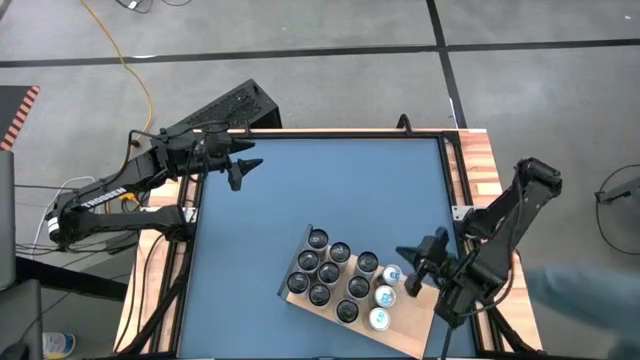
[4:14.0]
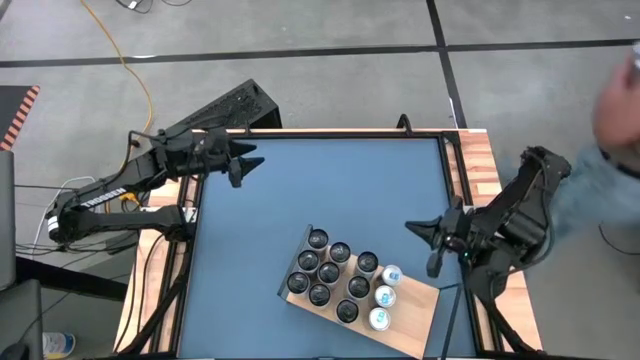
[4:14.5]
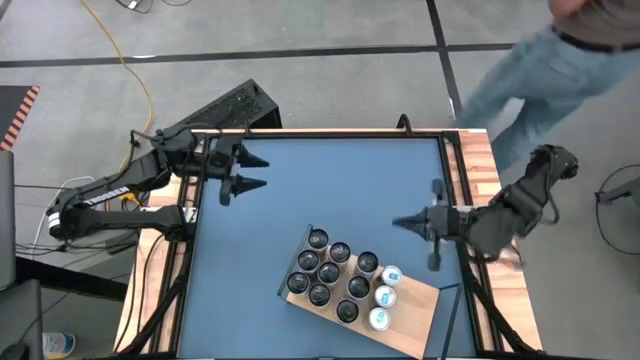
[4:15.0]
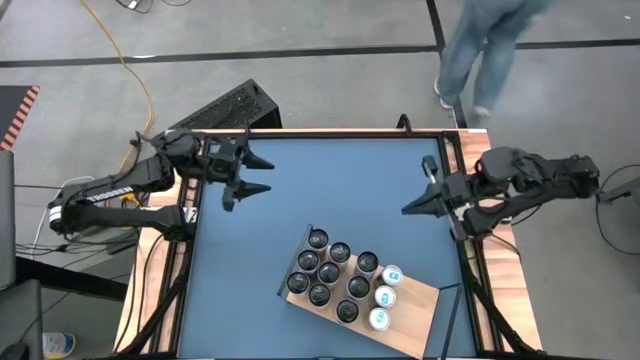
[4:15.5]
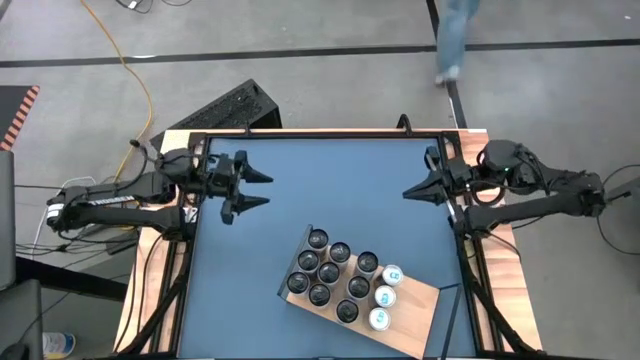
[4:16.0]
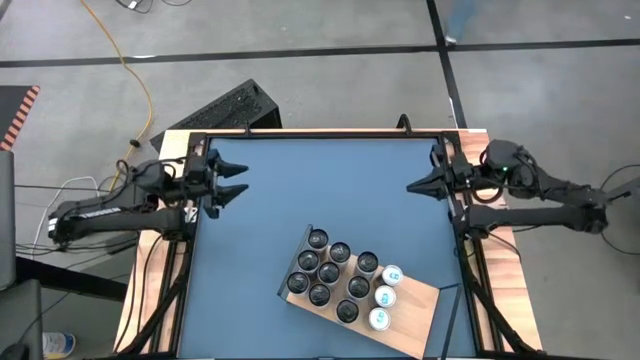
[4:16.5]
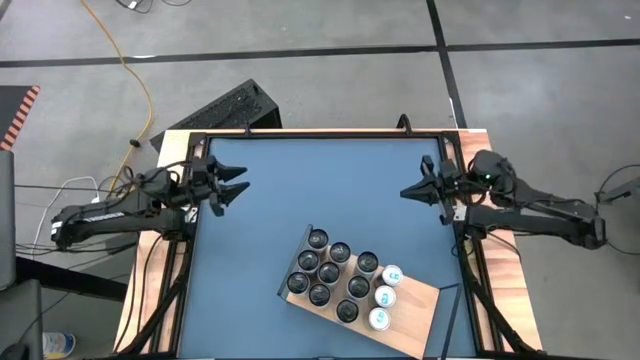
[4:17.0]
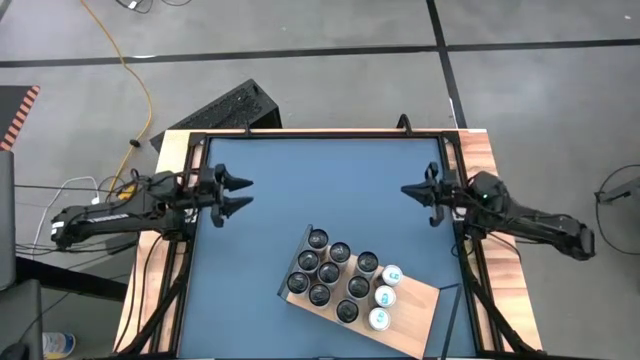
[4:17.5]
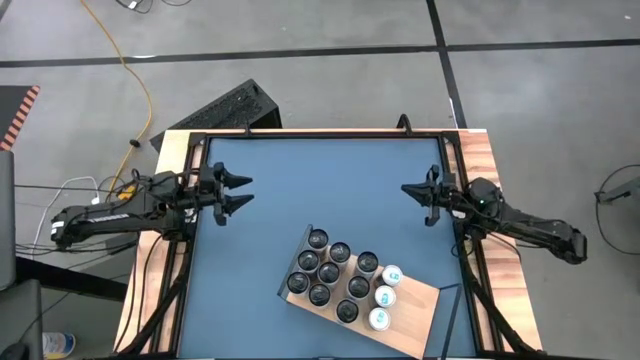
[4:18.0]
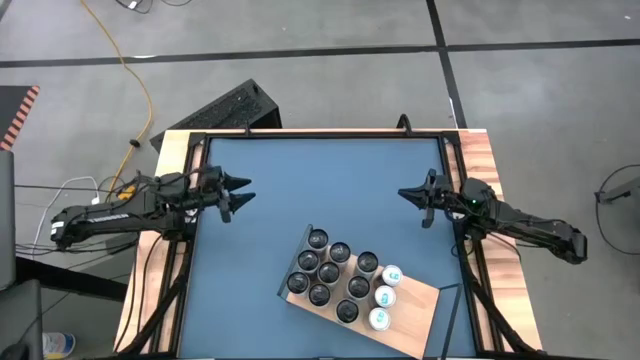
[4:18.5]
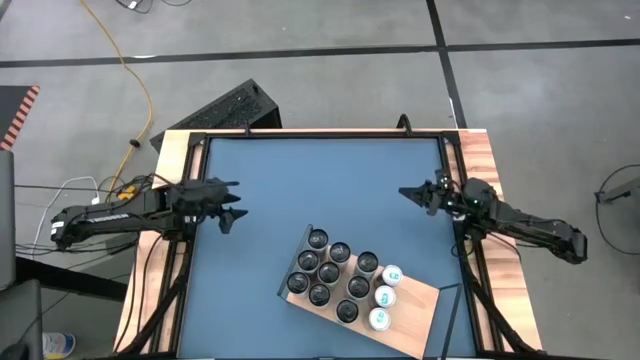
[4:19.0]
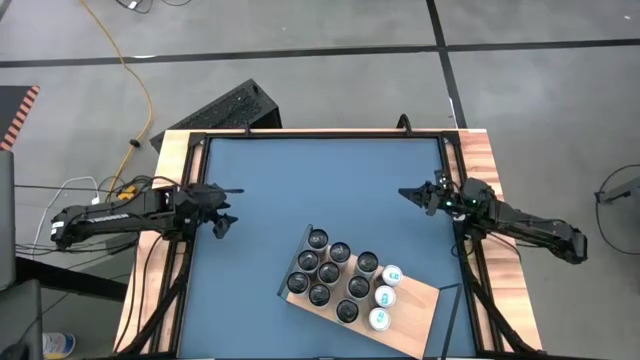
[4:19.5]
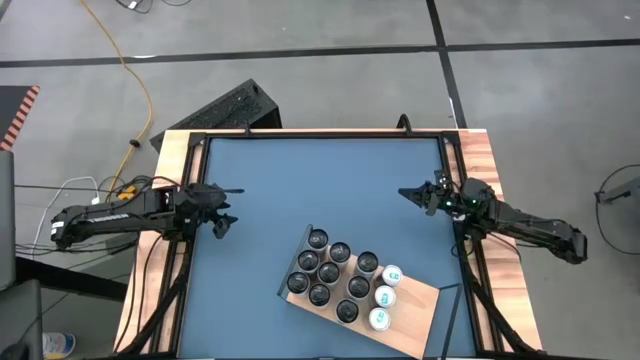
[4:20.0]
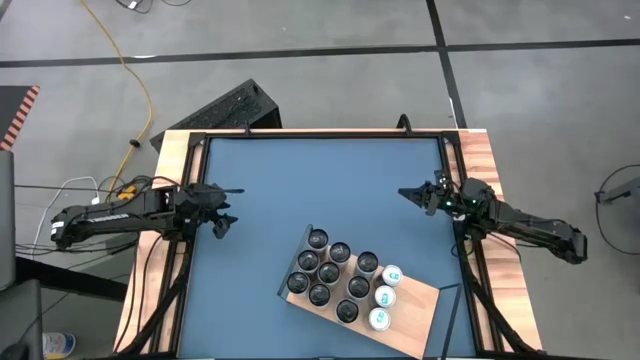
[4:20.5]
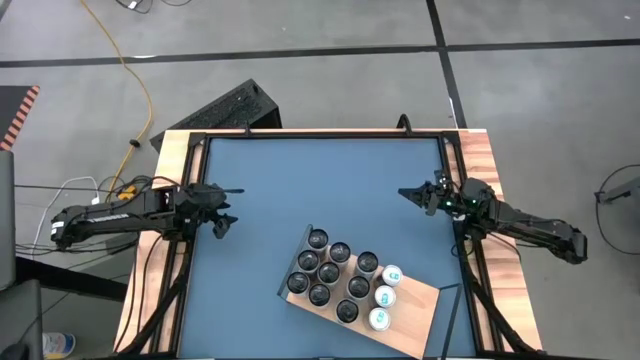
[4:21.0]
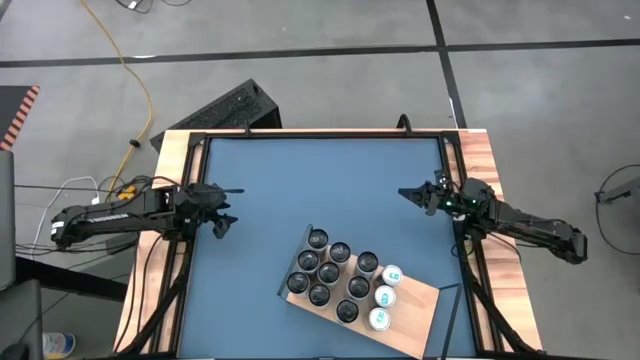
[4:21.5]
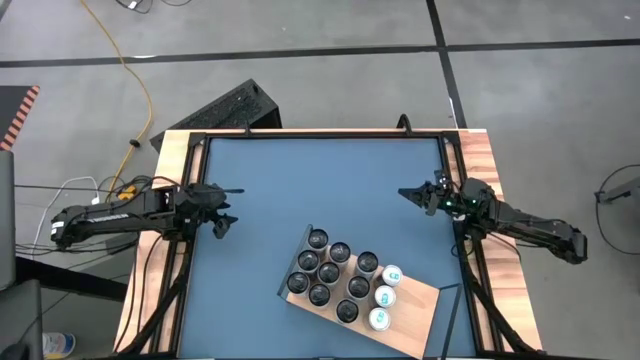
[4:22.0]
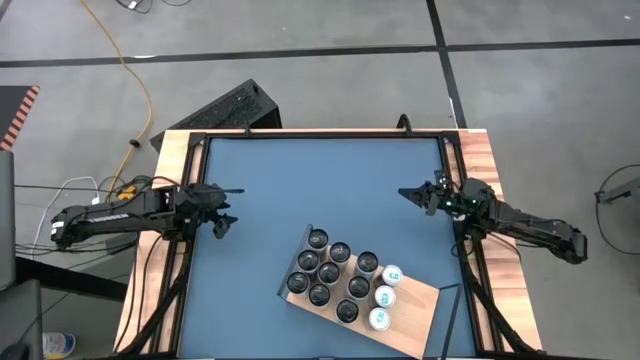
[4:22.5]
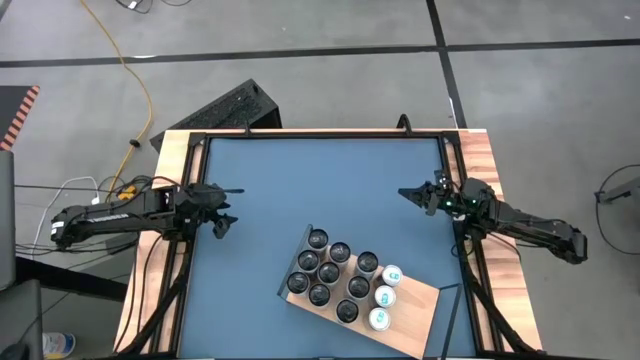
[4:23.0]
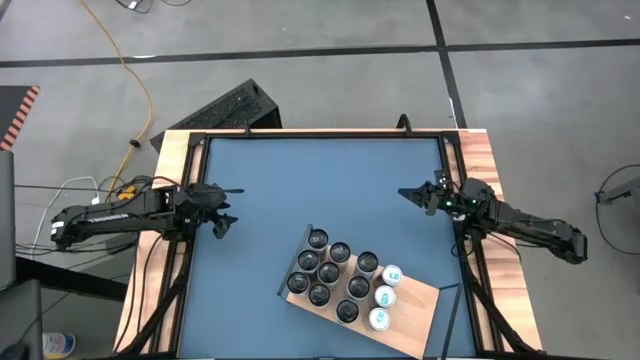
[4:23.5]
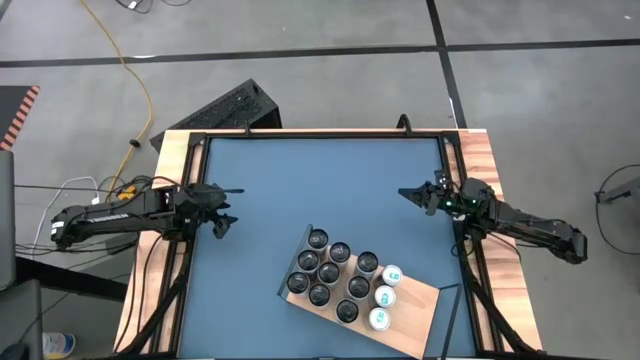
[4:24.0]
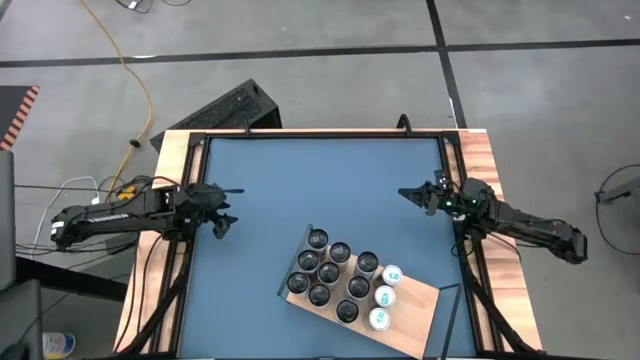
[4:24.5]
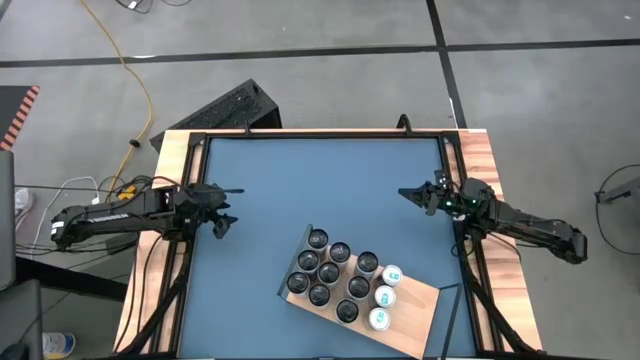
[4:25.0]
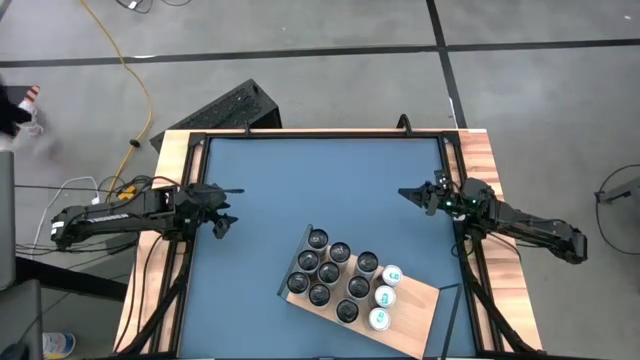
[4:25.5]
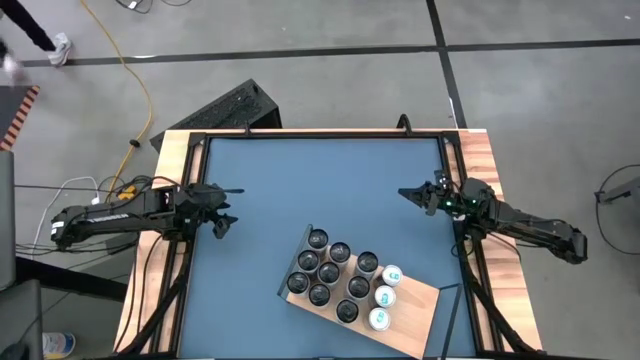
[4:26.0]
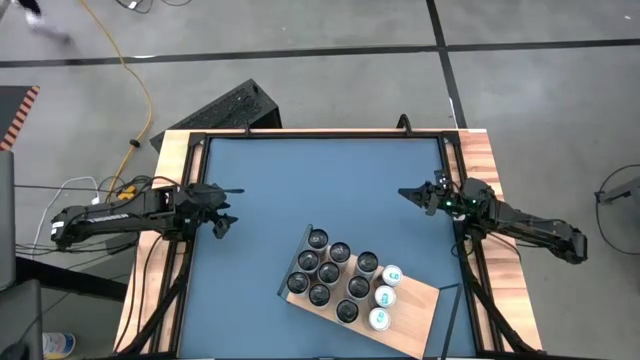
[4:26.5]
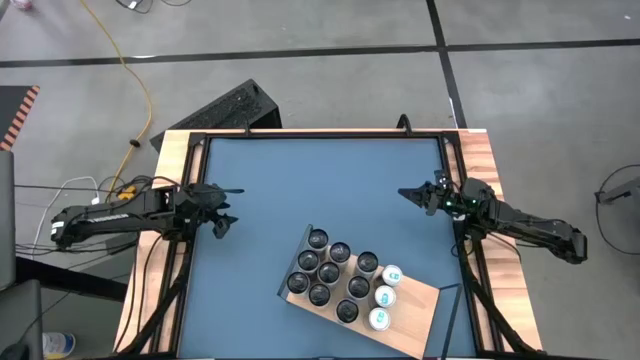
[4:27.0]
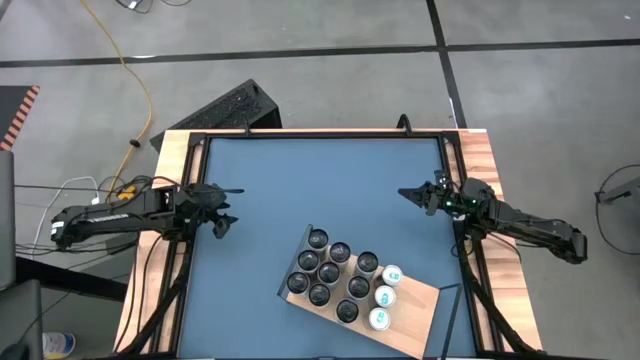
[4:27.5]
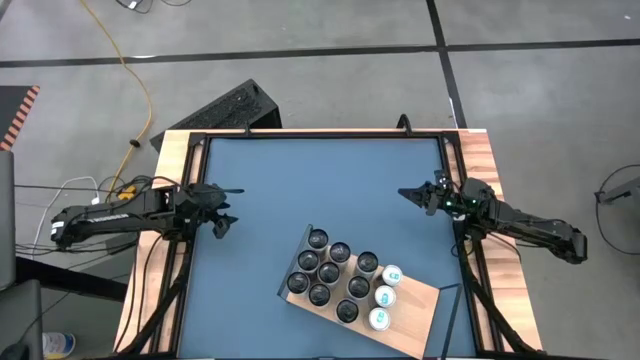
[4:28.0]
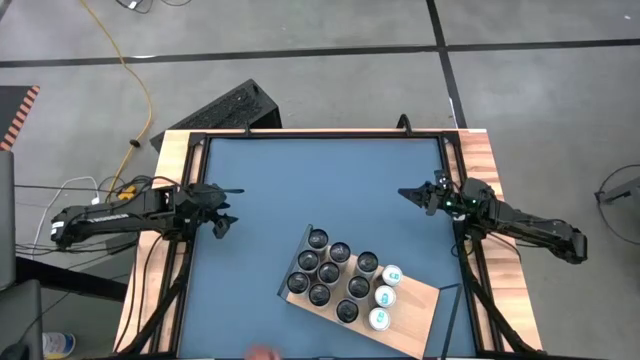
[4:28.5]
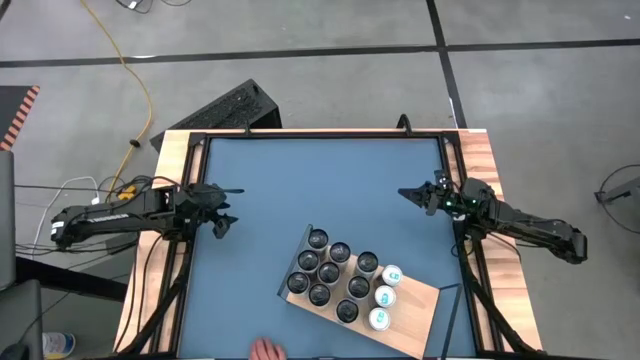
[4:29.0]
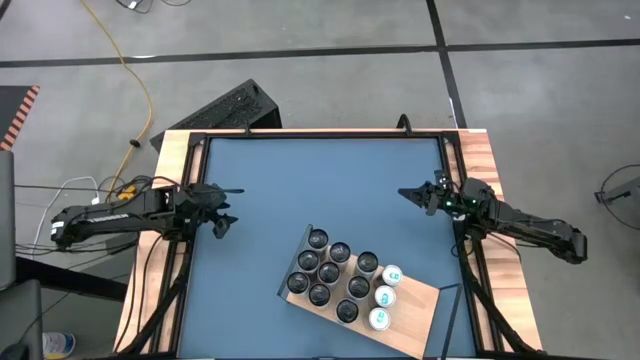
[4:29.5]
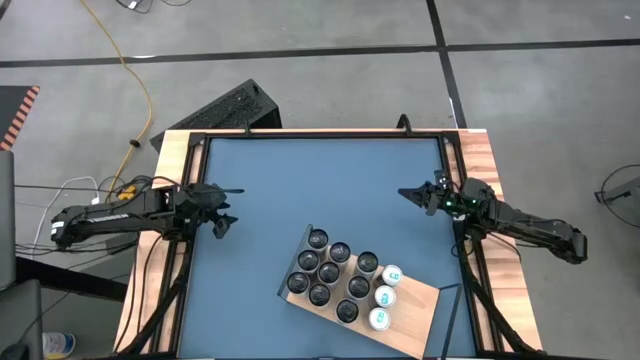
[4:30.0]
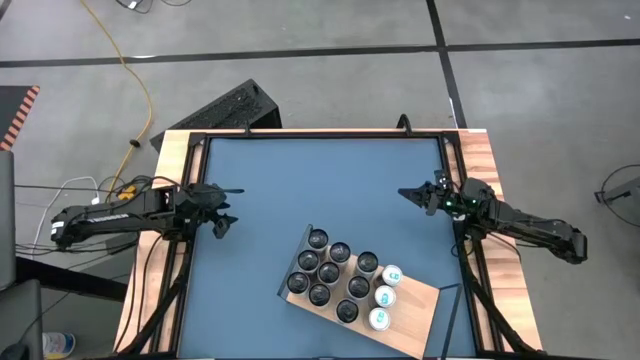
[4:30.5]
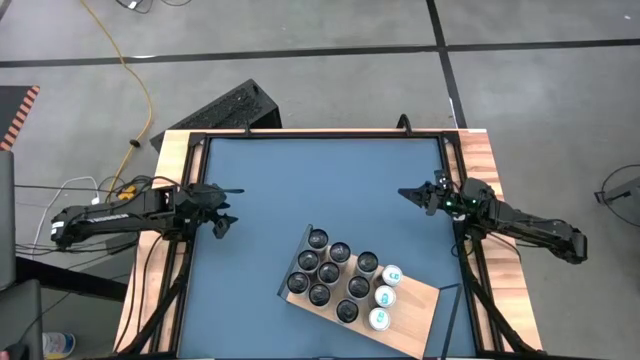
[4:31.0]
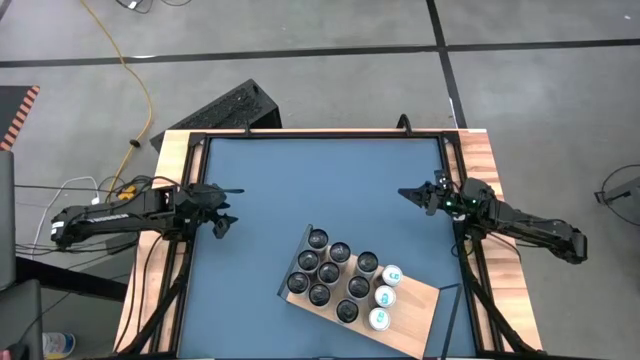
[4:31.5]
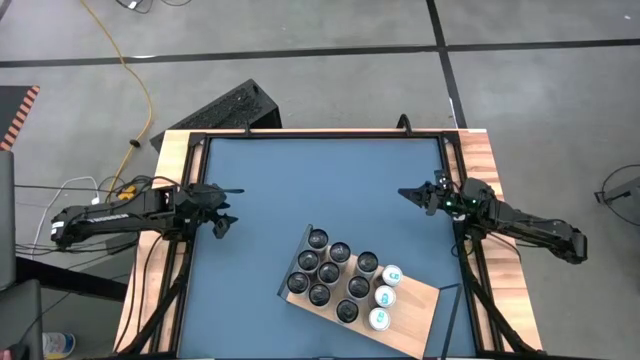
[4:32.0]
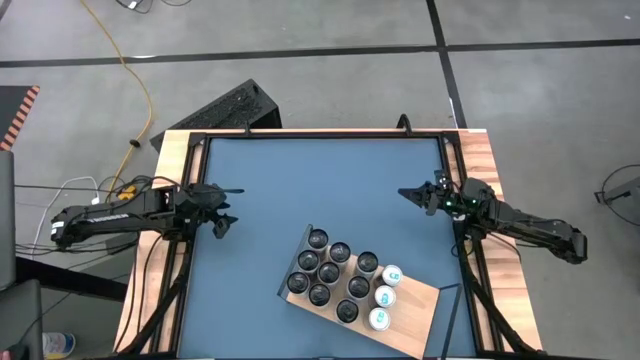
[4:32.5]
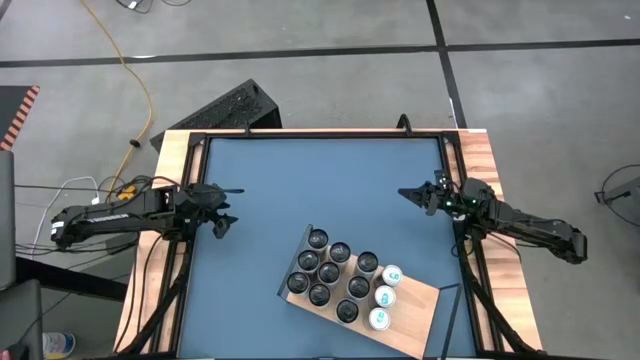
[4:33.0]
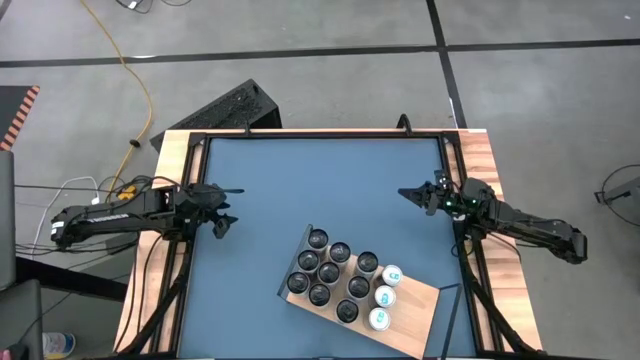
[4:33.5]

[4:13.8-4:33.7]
Task: Place canned beverage on shelf
Return to Home Position

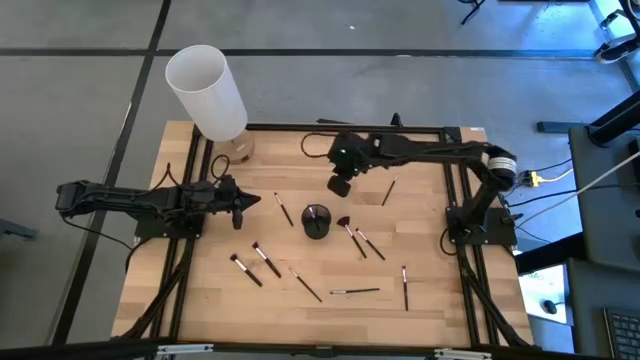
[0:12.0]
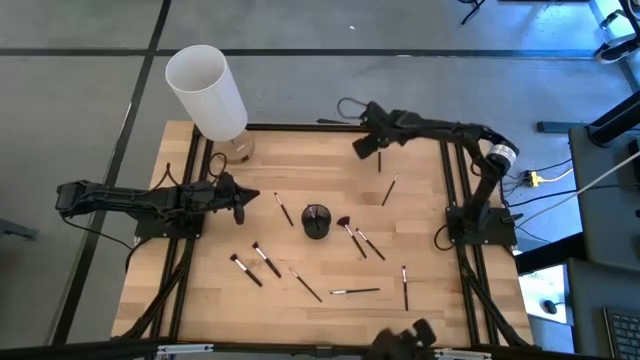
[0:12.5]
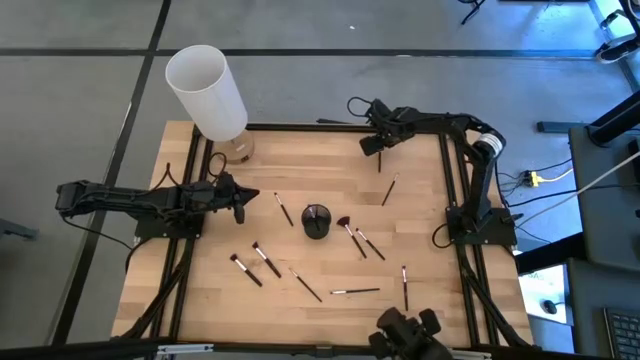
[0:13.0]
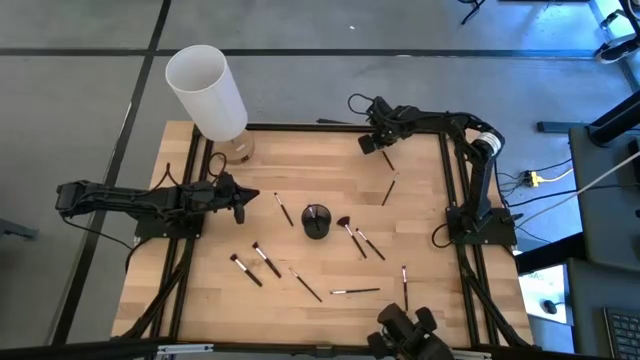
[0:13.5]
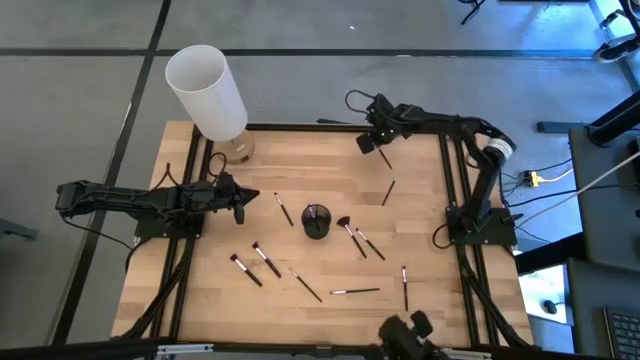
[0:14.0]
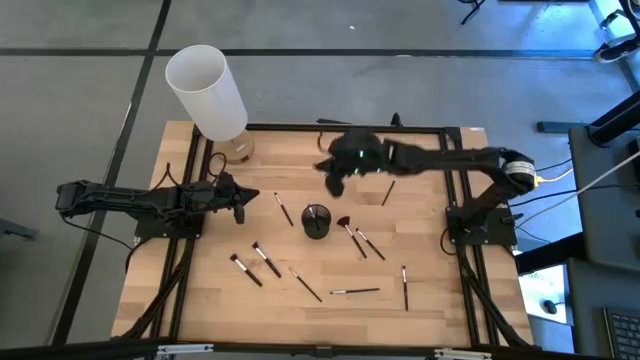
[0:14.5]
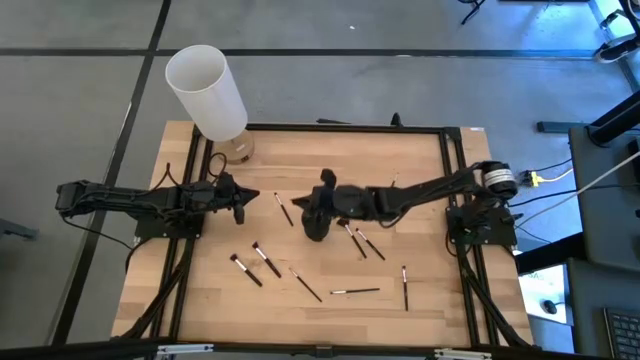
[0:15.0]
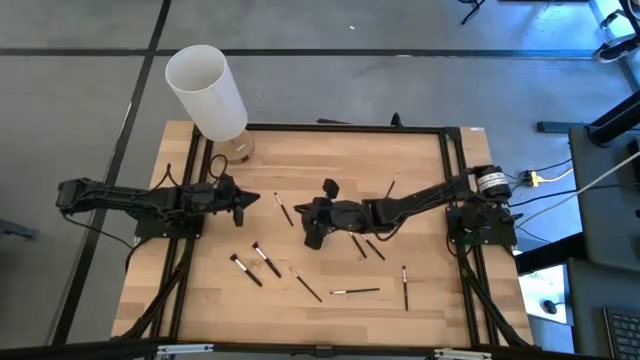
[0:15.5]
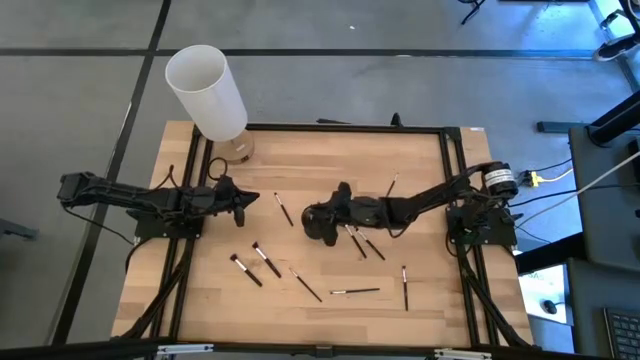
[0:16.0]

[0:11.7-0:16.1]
Task: Sort items
Put the silver eyeshadow brush into the pen holder
